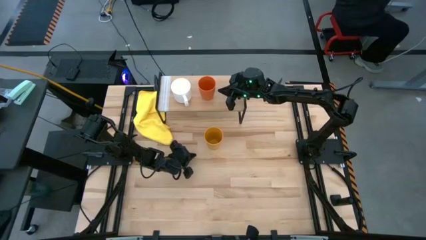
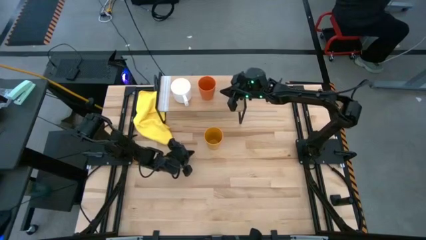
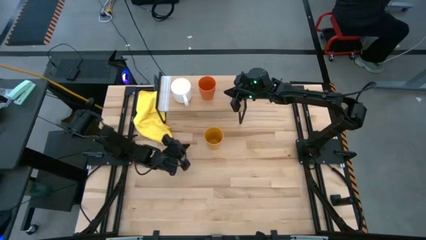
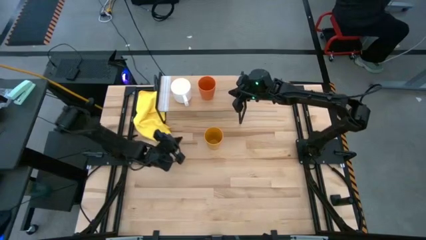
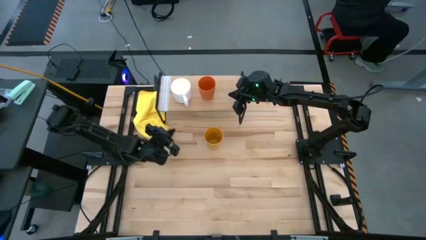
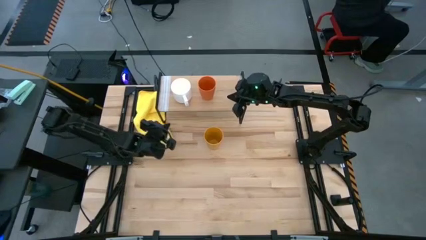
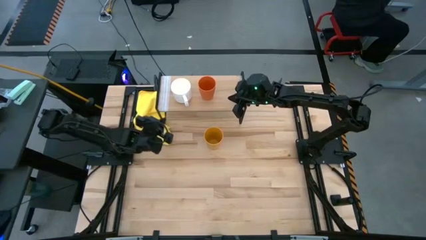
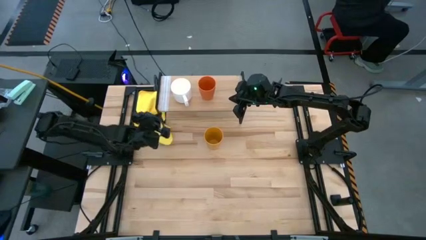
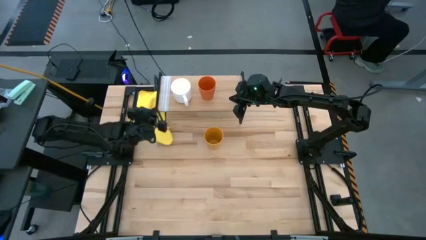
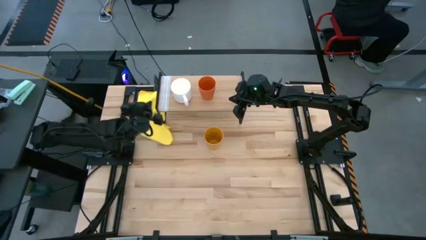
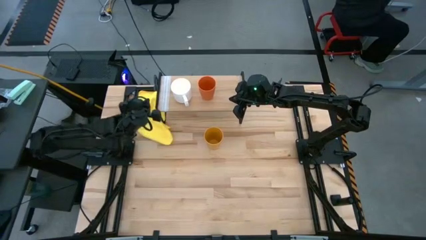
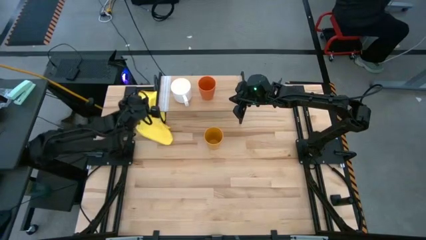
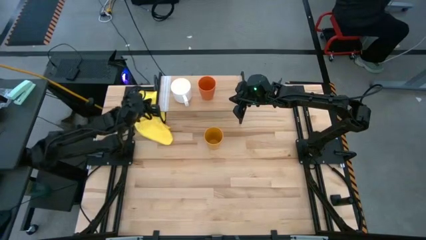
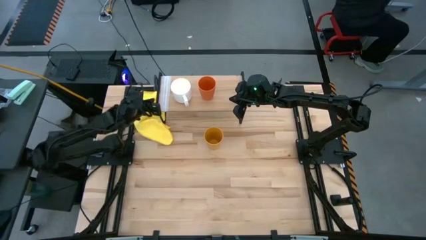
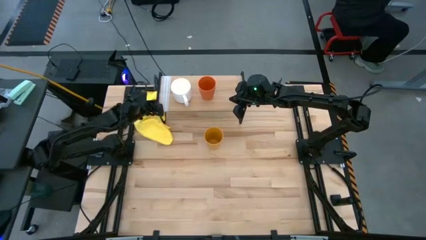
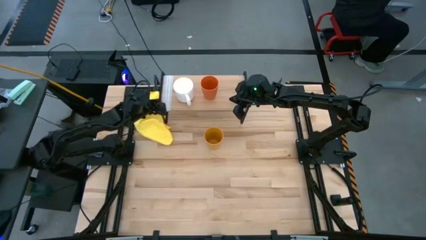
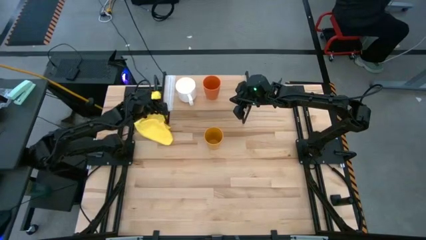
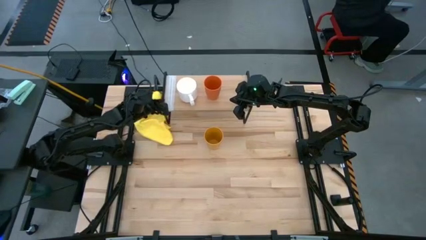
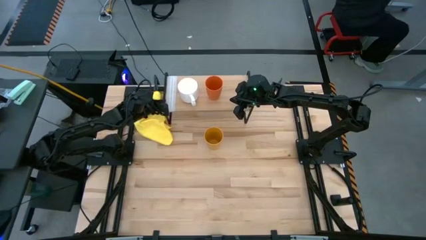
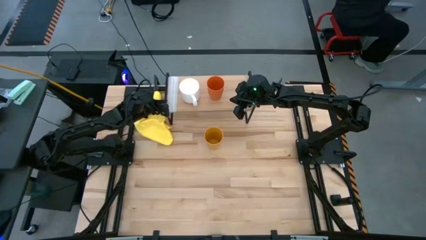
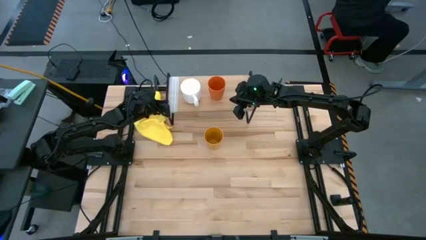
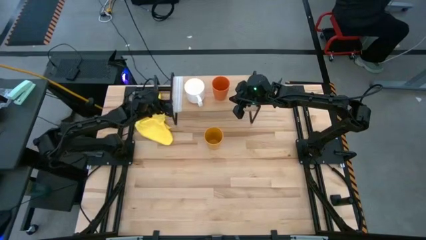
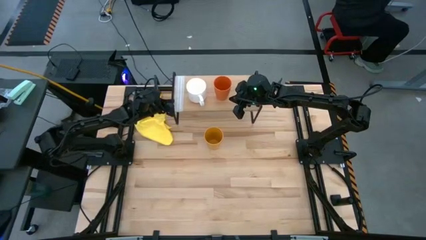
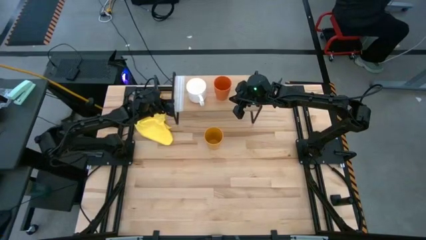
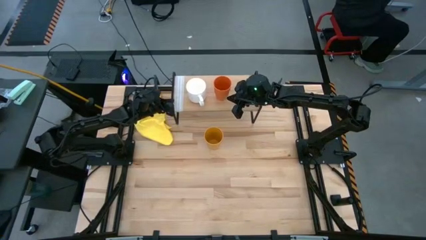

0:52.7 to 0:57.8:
Task: Stack small to large cups/mugs on shelf
Adjust the shelf

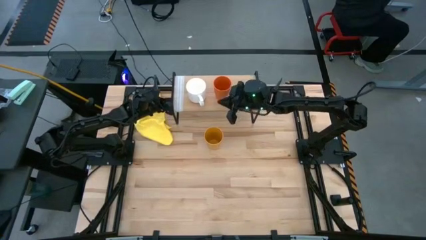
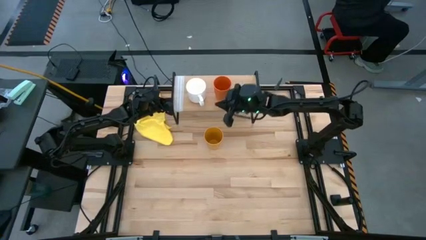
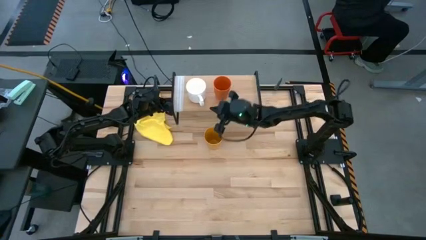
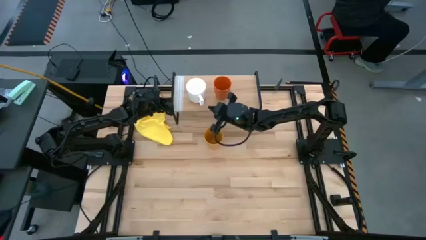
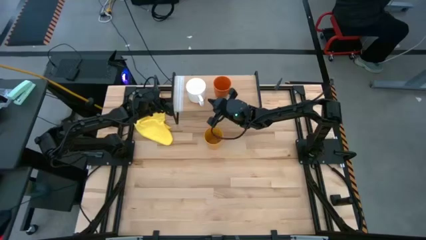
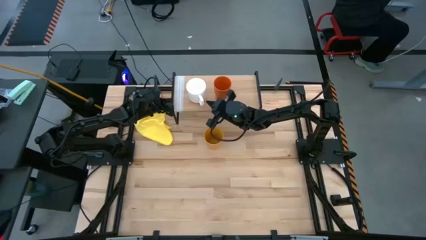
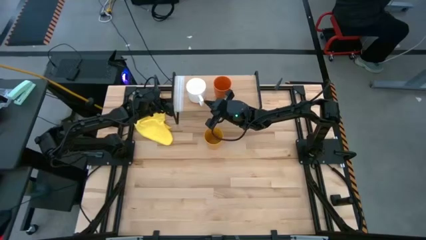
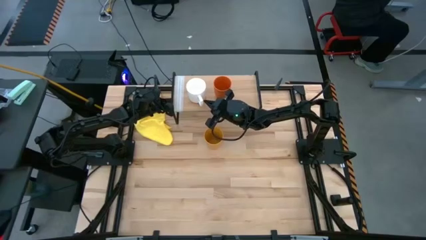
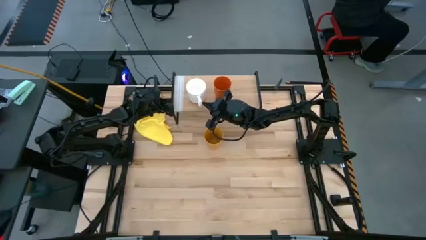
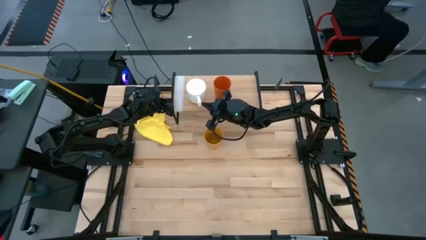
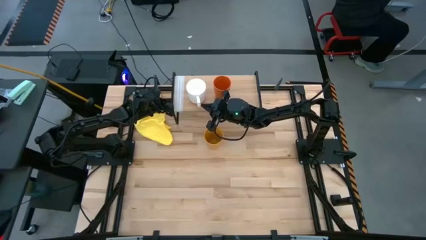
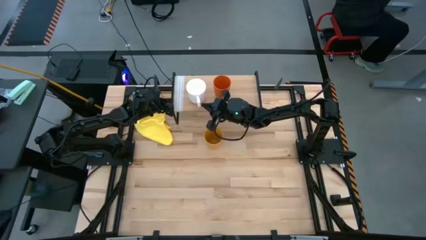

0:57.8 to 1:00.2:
Adjust the white mug on the shelf

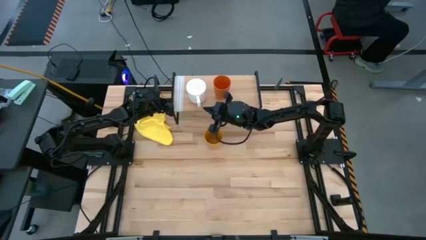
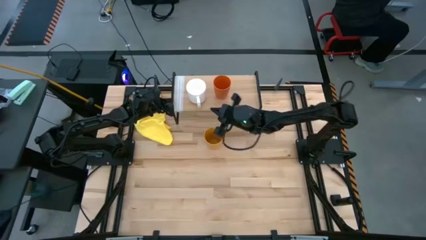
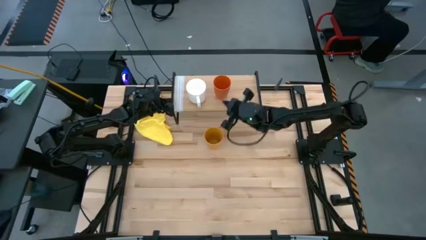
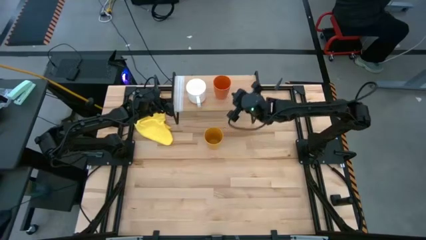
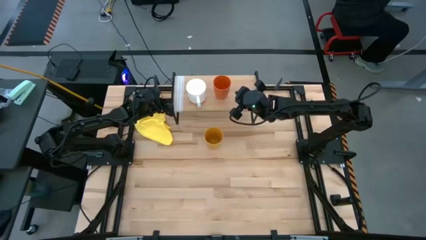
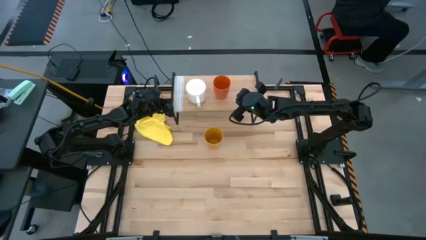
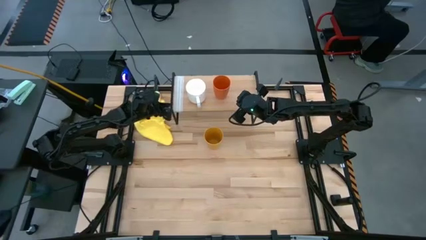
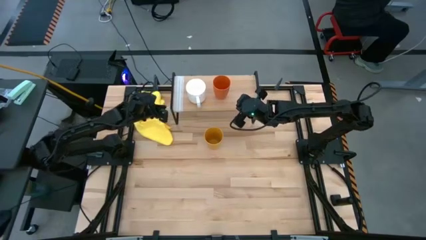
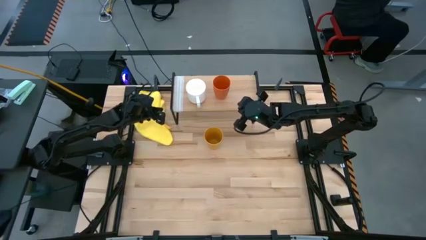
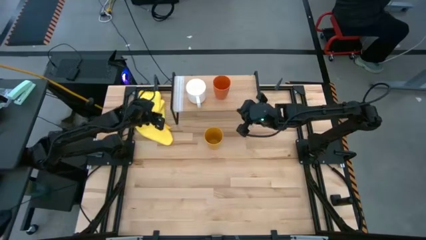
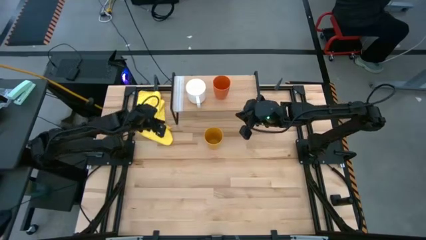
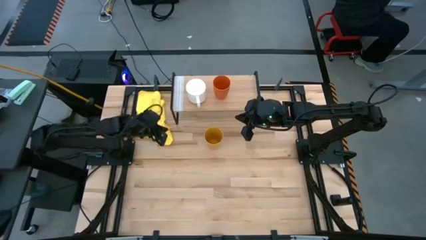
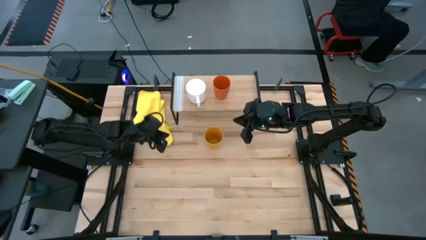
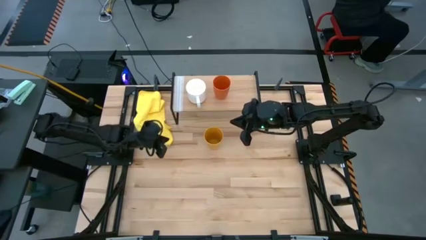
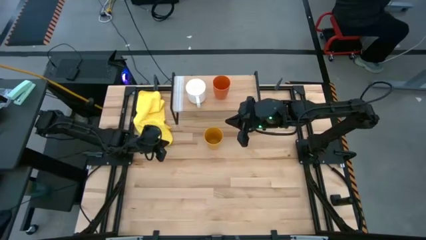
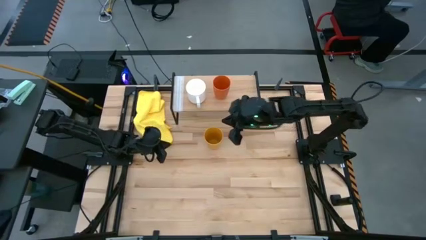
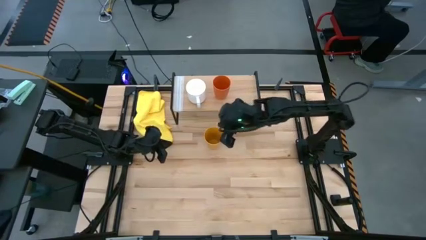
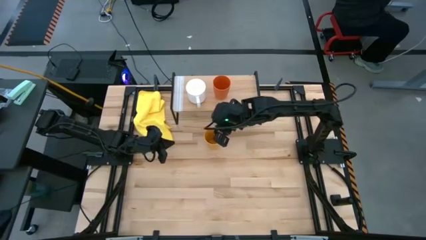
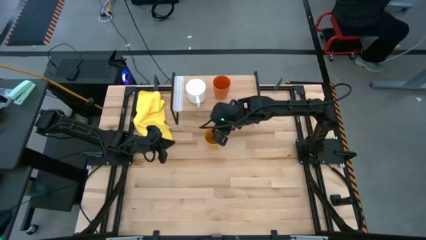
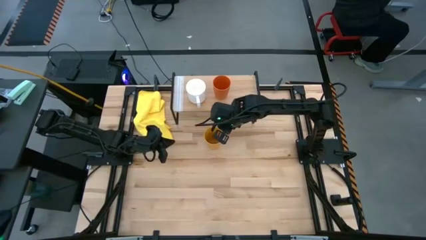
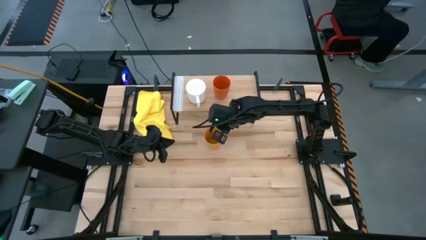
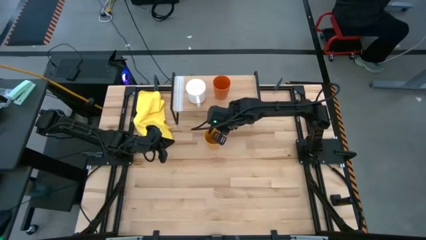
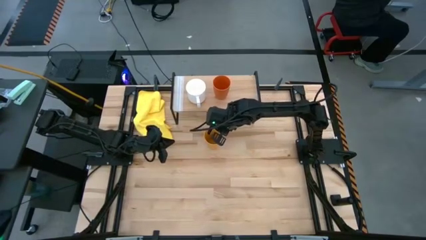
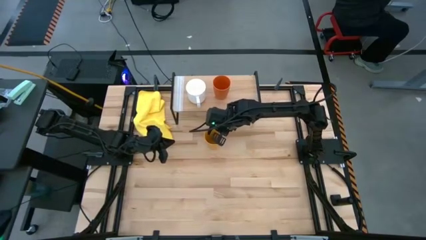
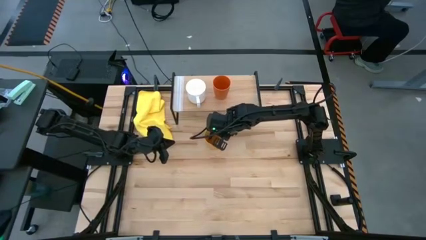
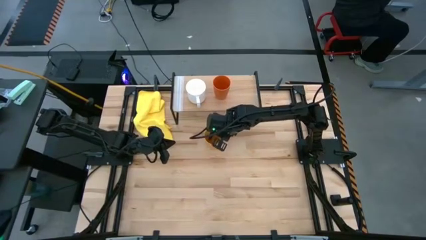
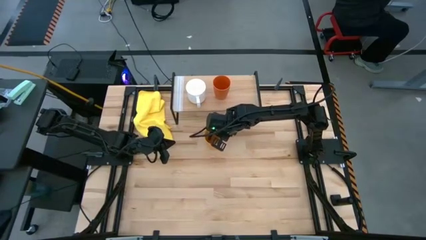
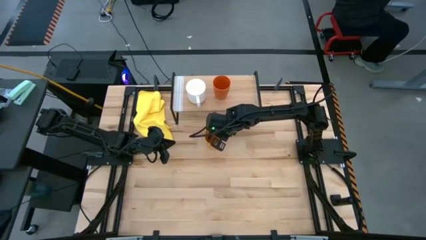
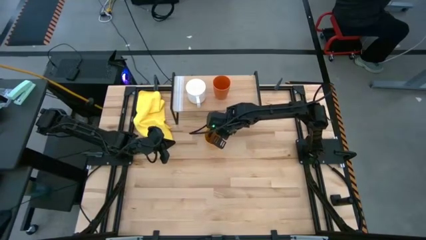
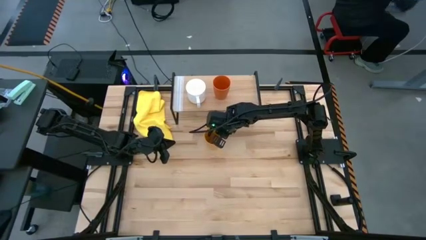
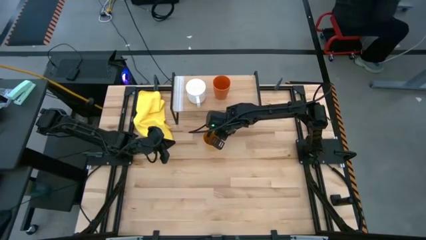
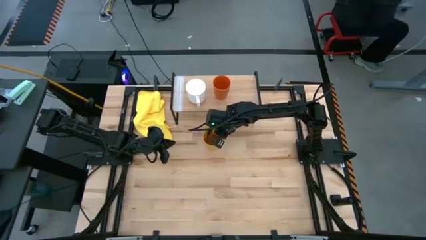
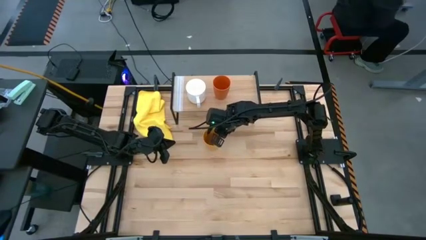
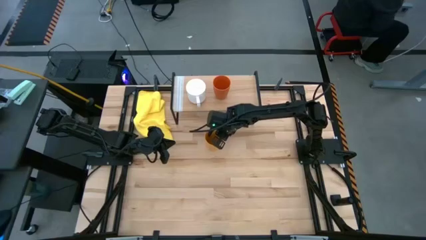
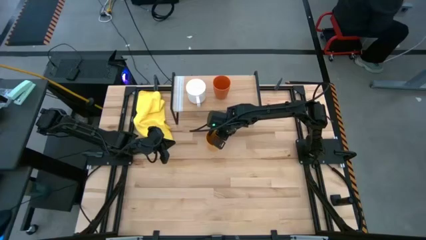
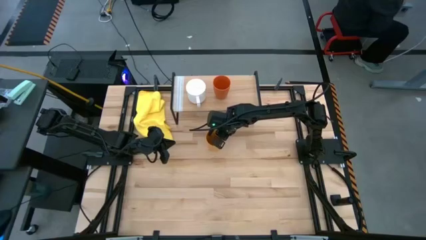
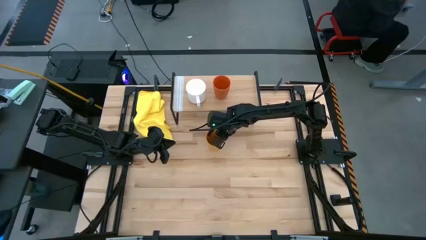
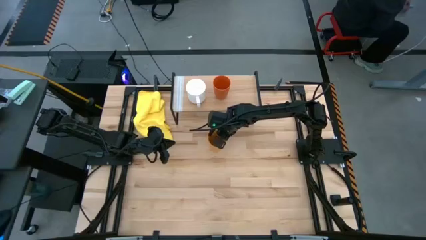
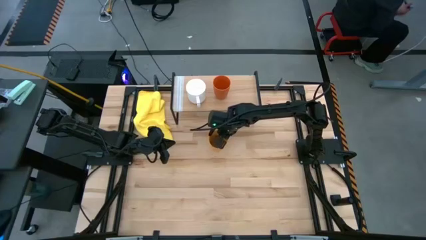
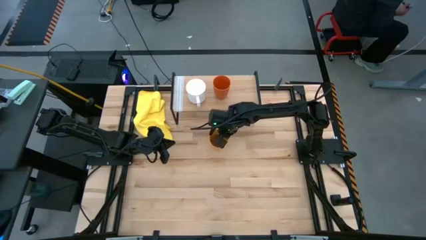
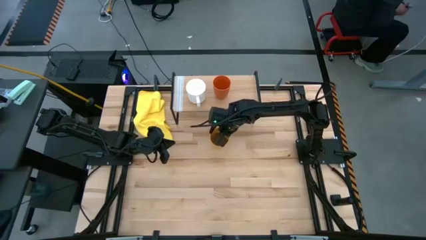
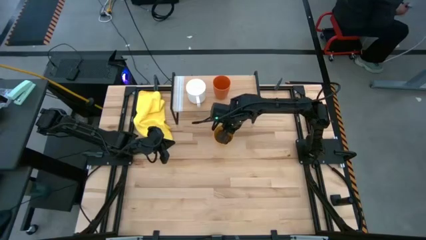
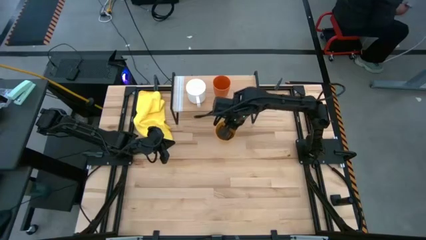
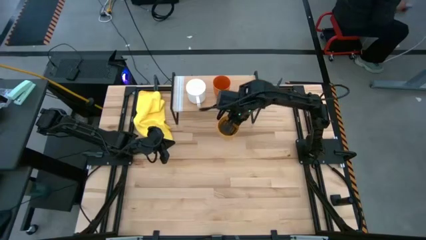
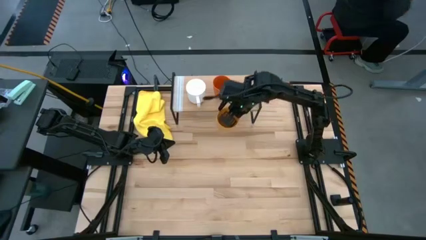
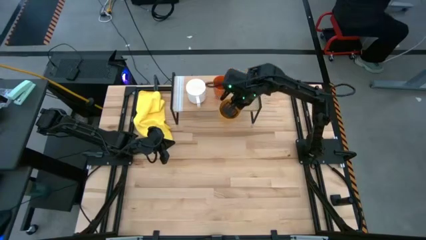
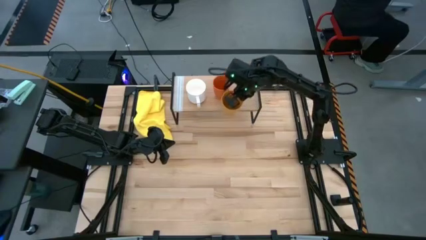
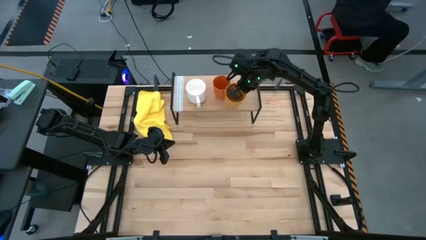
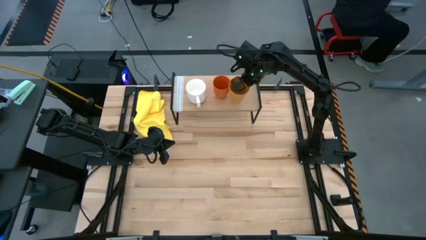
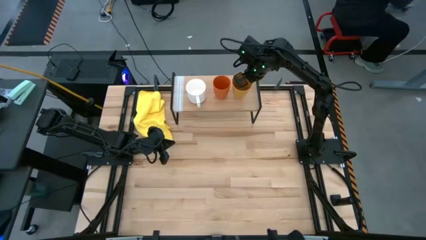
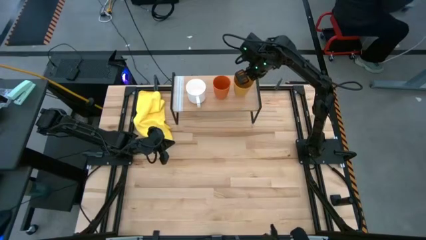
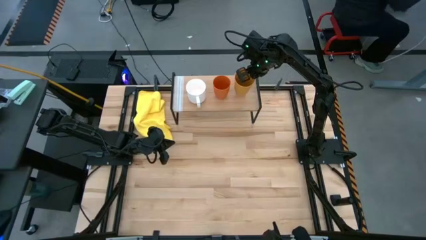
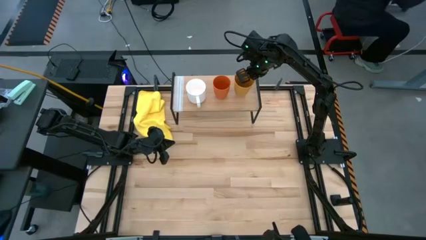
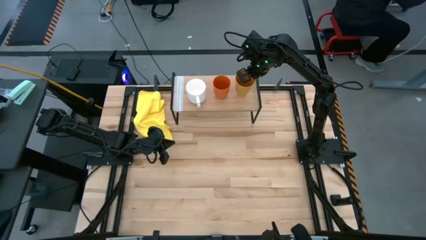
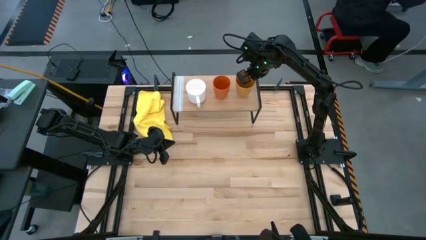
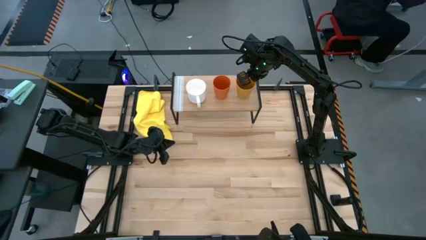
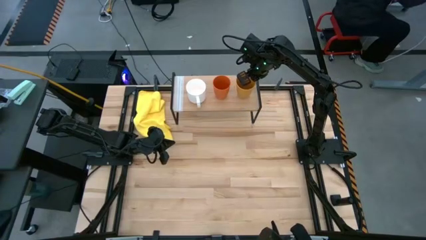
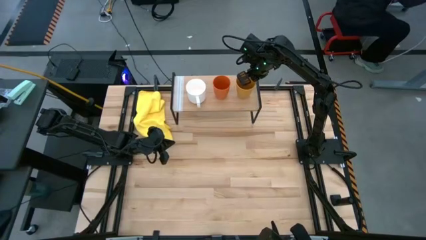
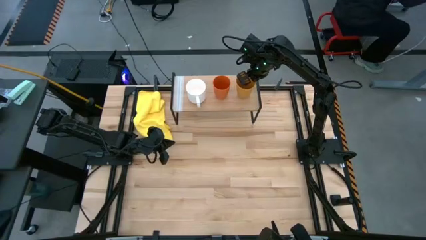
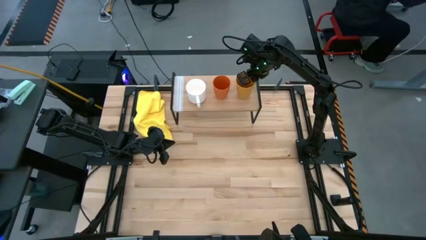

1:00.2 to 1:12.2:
Put the yellow cup on the shelf
